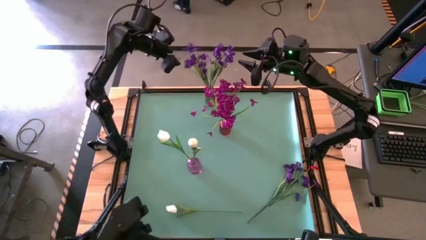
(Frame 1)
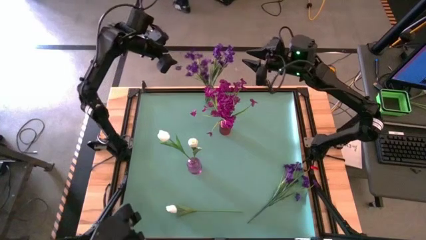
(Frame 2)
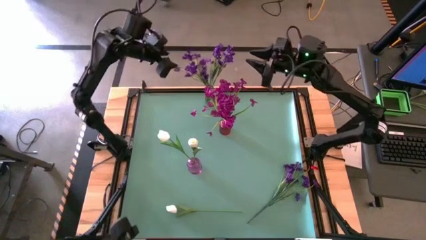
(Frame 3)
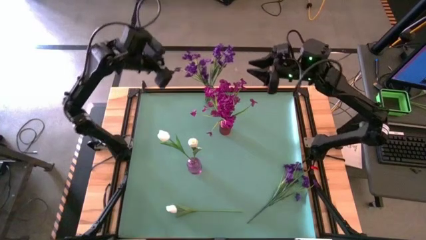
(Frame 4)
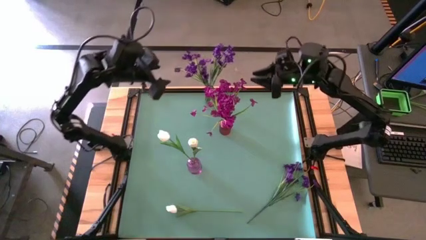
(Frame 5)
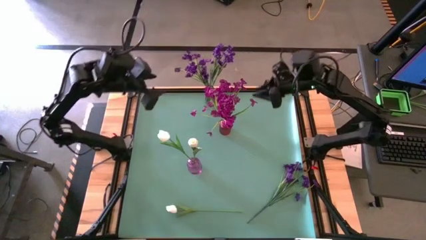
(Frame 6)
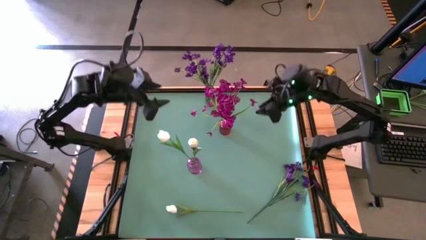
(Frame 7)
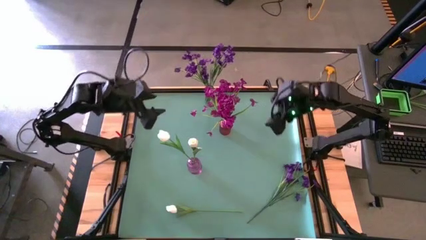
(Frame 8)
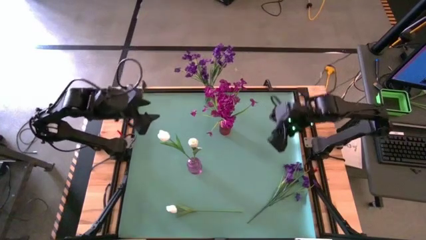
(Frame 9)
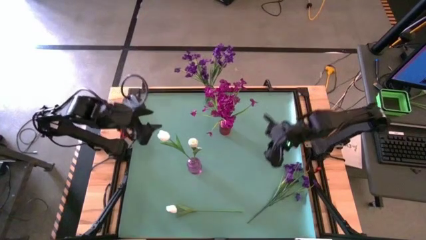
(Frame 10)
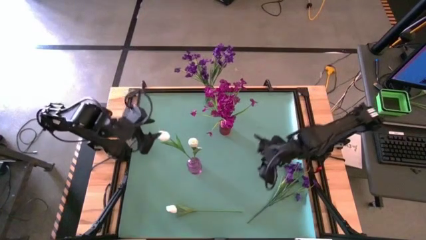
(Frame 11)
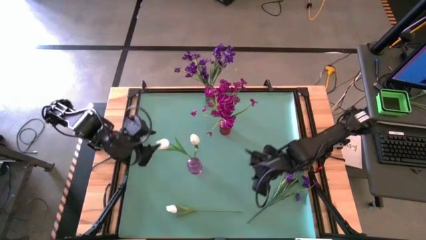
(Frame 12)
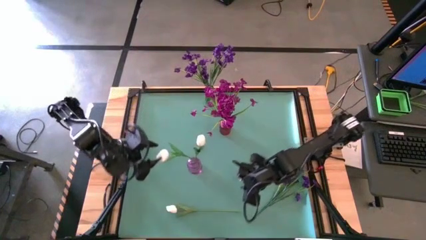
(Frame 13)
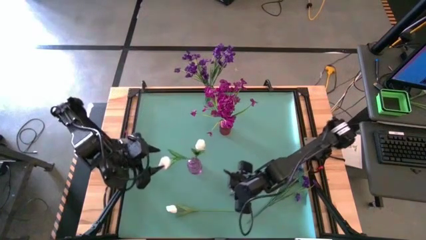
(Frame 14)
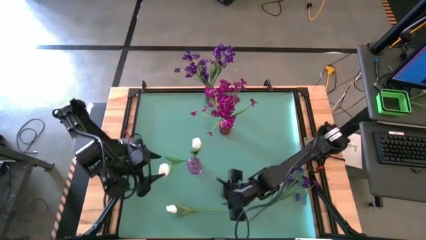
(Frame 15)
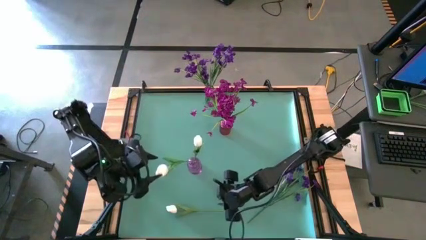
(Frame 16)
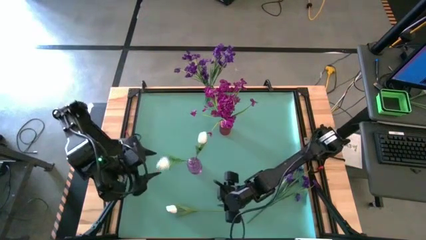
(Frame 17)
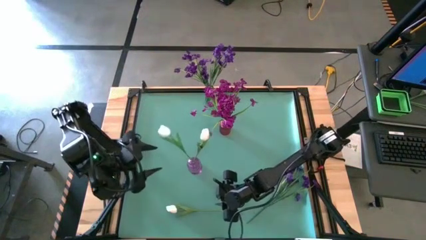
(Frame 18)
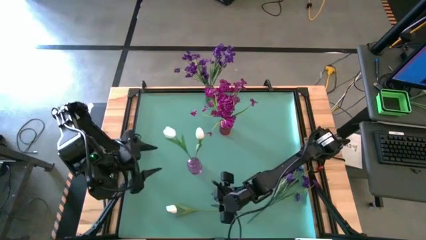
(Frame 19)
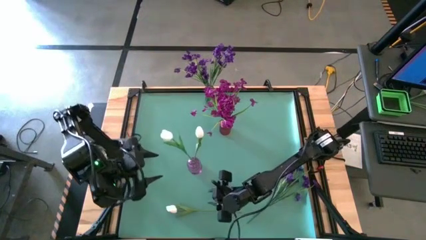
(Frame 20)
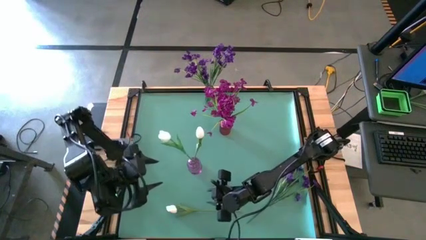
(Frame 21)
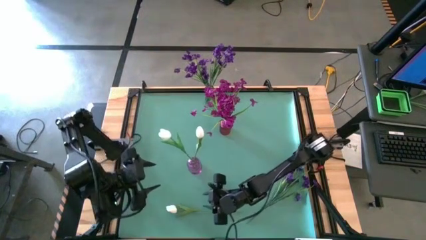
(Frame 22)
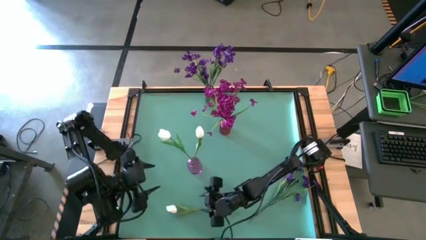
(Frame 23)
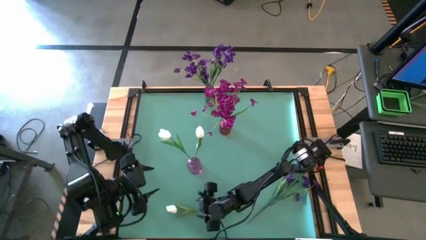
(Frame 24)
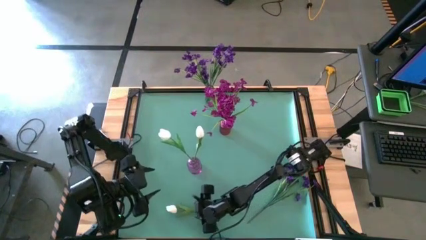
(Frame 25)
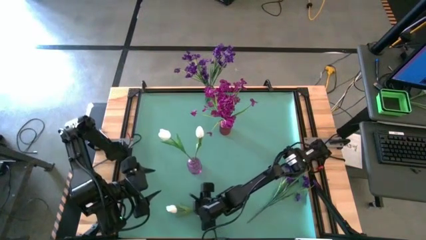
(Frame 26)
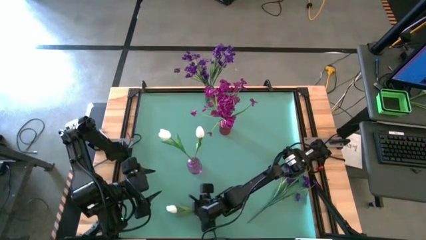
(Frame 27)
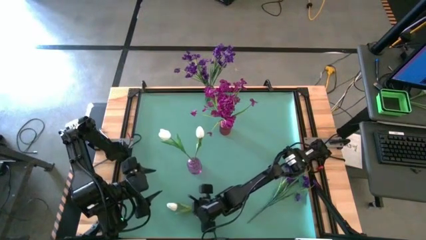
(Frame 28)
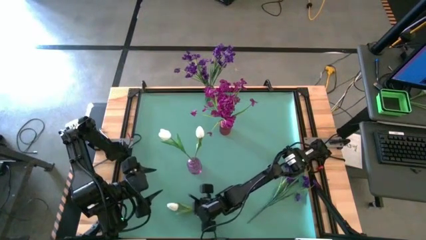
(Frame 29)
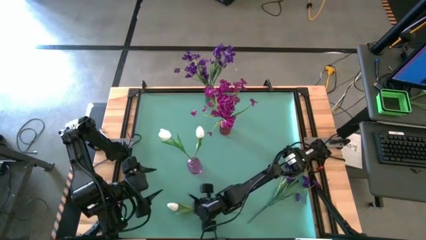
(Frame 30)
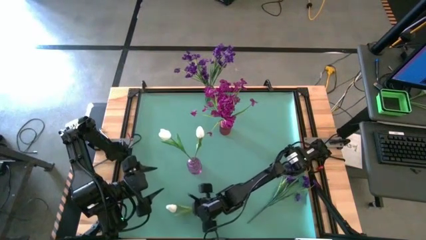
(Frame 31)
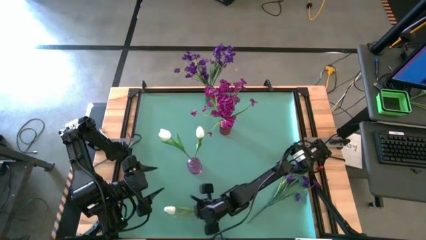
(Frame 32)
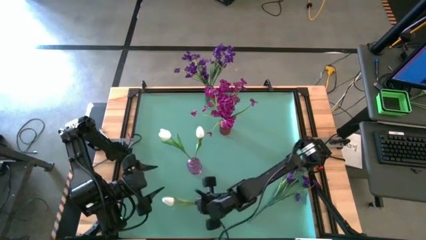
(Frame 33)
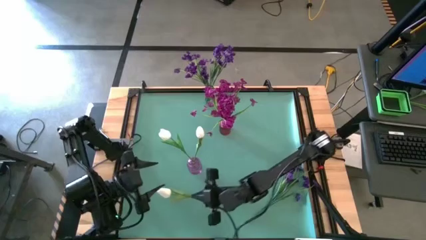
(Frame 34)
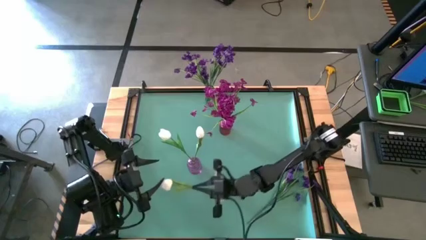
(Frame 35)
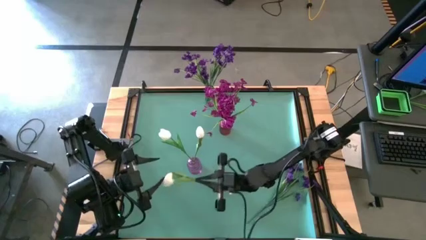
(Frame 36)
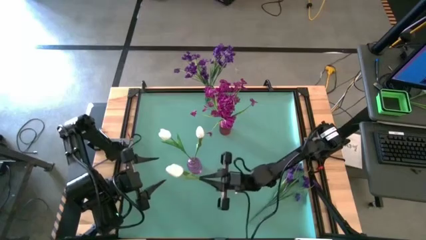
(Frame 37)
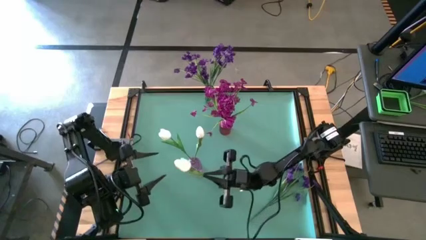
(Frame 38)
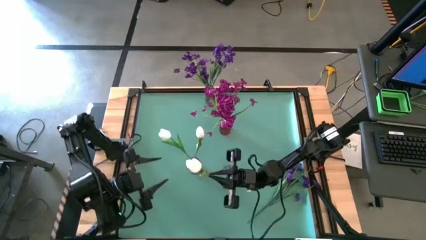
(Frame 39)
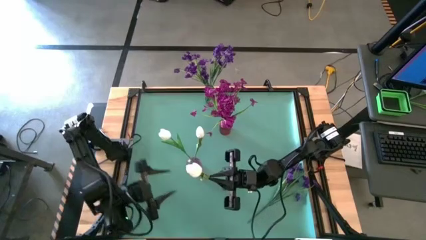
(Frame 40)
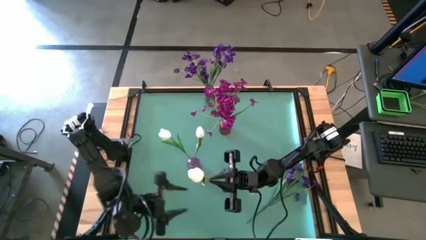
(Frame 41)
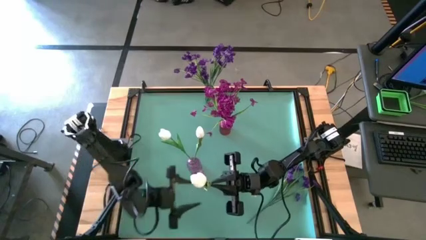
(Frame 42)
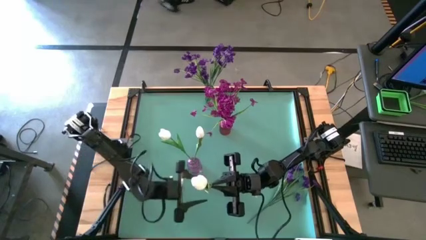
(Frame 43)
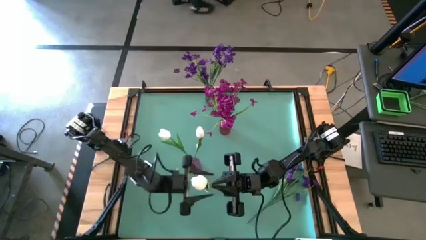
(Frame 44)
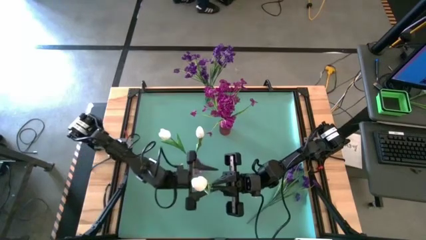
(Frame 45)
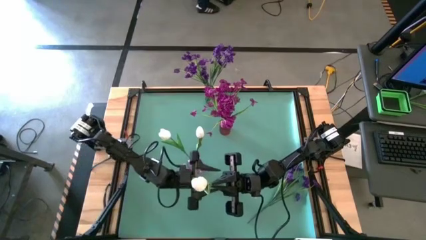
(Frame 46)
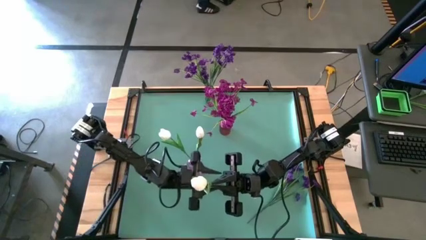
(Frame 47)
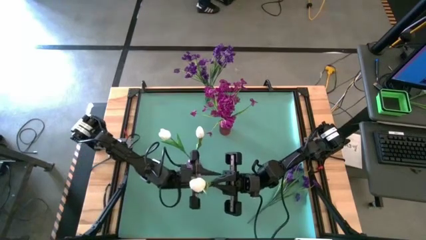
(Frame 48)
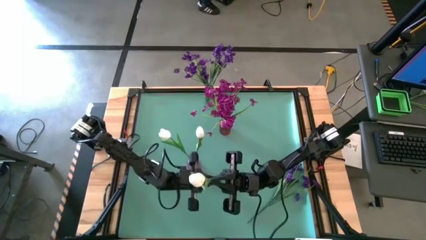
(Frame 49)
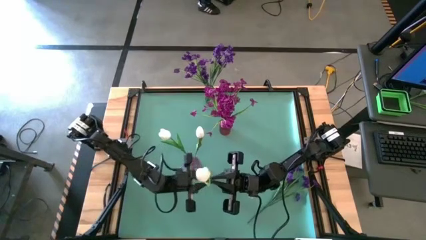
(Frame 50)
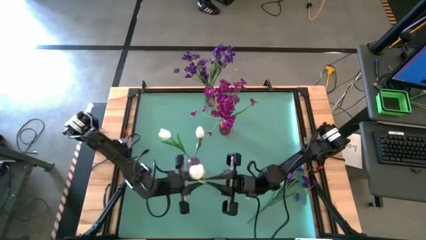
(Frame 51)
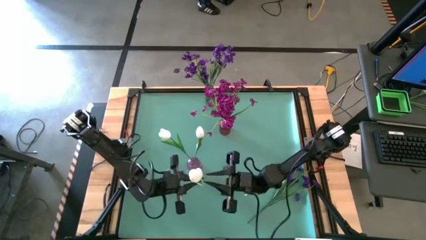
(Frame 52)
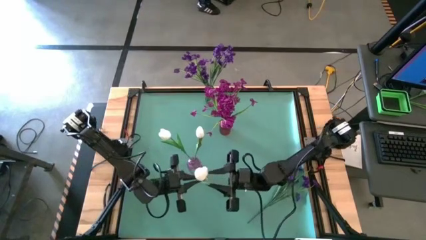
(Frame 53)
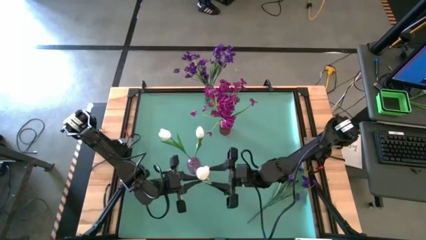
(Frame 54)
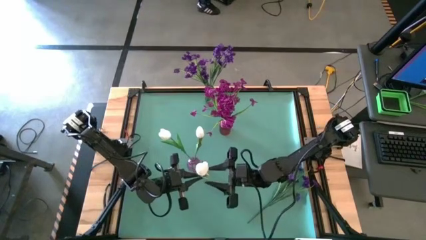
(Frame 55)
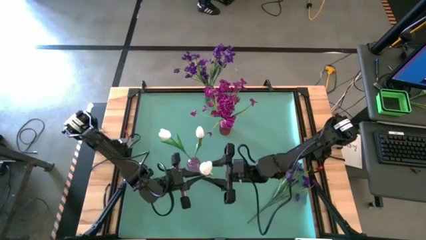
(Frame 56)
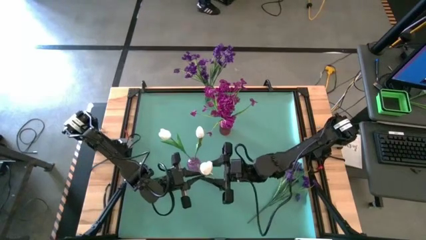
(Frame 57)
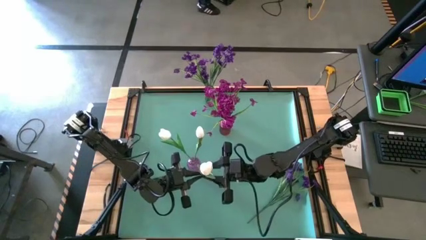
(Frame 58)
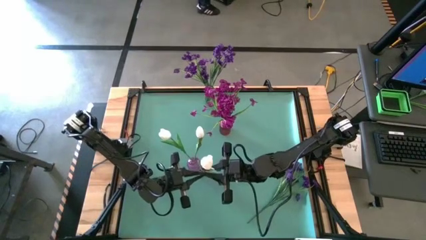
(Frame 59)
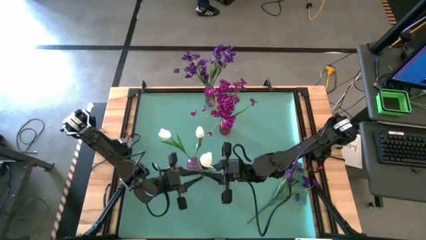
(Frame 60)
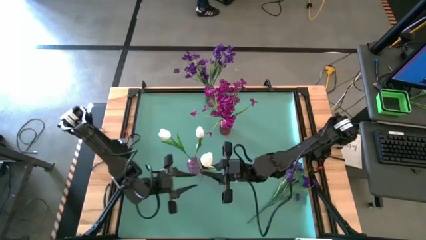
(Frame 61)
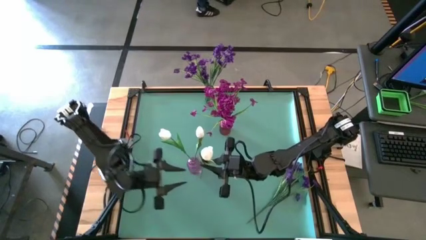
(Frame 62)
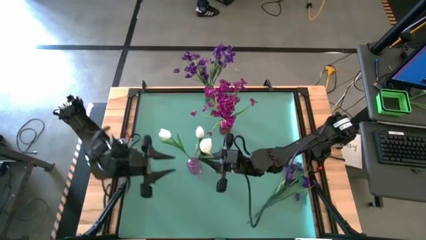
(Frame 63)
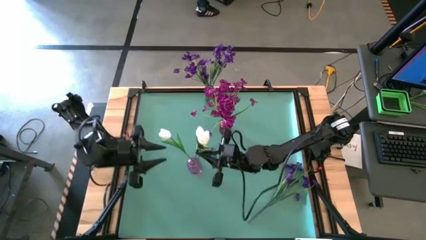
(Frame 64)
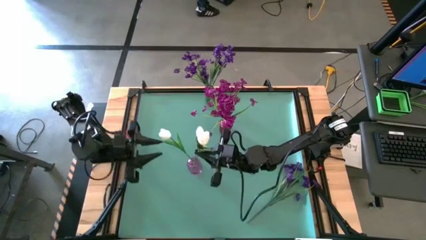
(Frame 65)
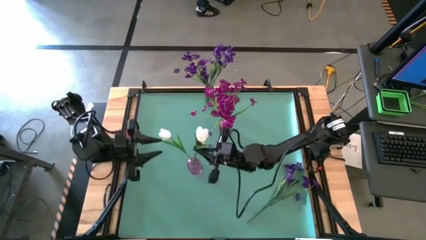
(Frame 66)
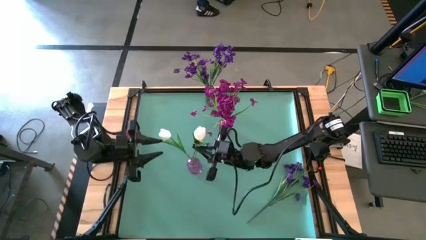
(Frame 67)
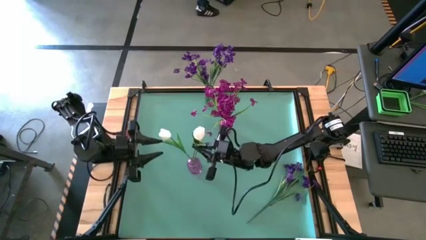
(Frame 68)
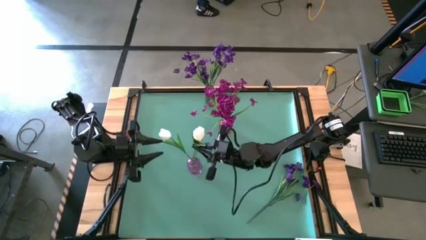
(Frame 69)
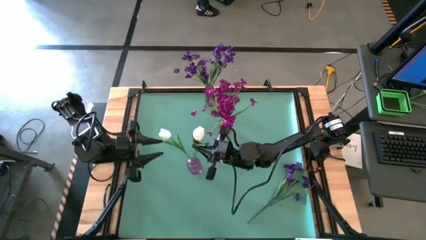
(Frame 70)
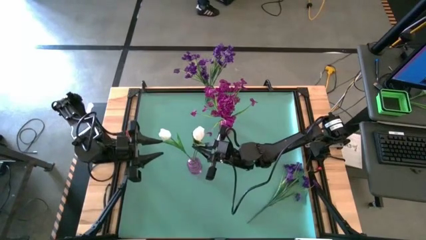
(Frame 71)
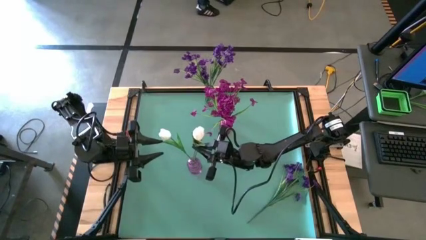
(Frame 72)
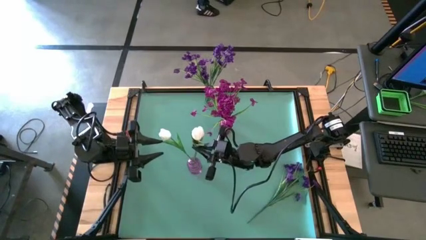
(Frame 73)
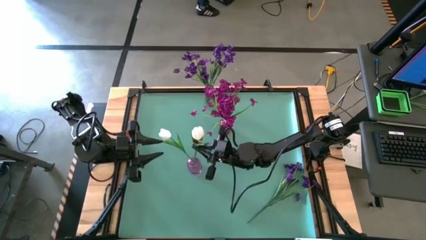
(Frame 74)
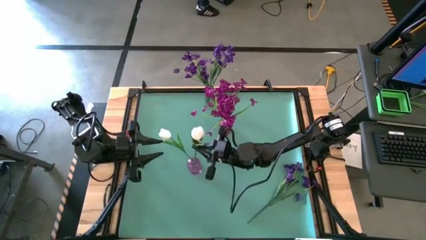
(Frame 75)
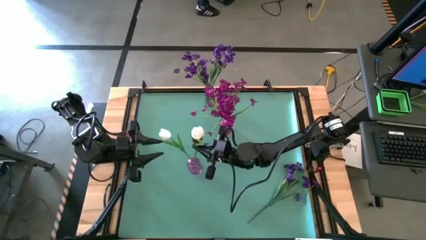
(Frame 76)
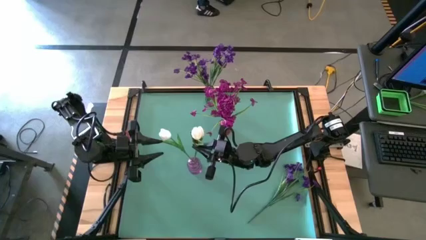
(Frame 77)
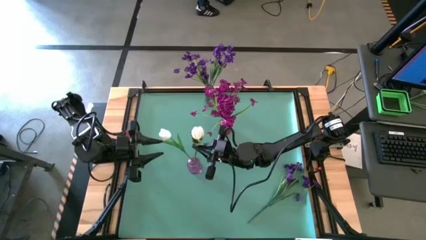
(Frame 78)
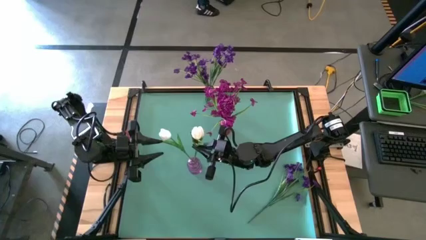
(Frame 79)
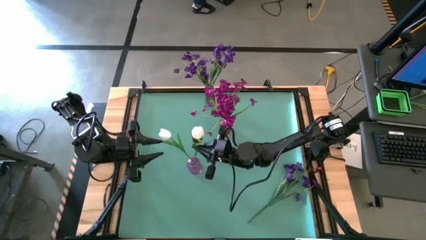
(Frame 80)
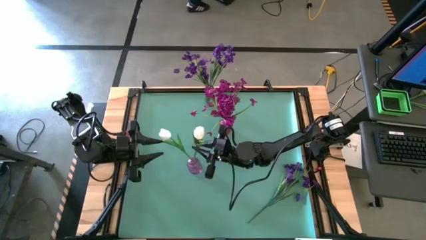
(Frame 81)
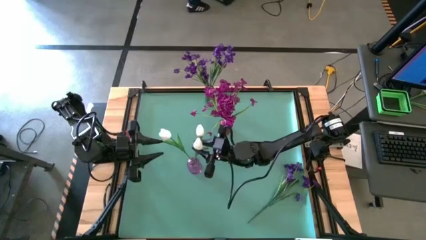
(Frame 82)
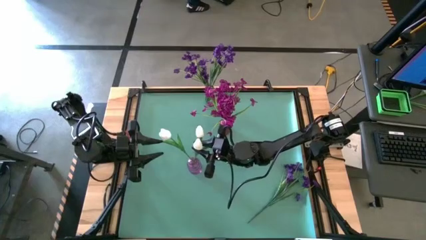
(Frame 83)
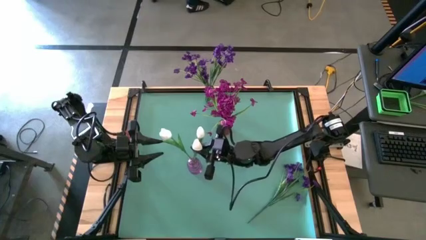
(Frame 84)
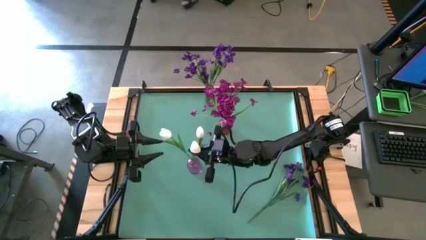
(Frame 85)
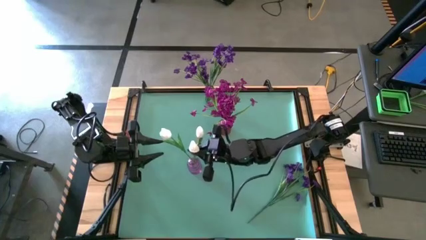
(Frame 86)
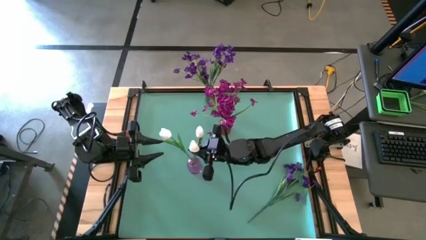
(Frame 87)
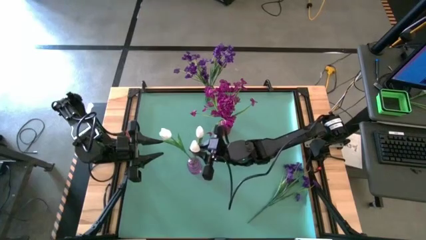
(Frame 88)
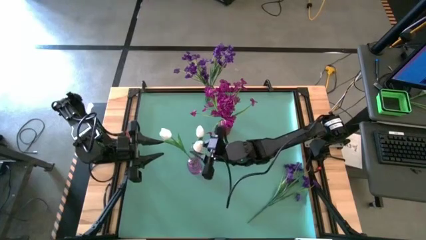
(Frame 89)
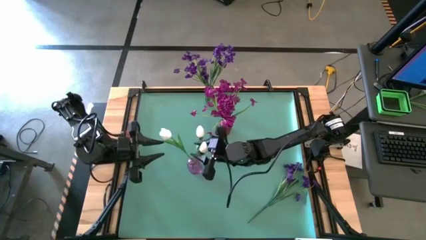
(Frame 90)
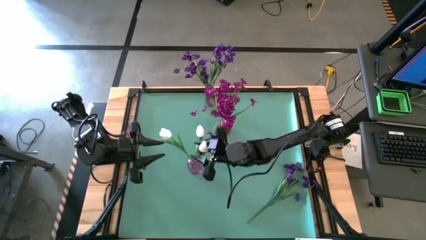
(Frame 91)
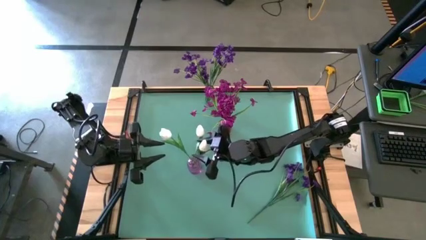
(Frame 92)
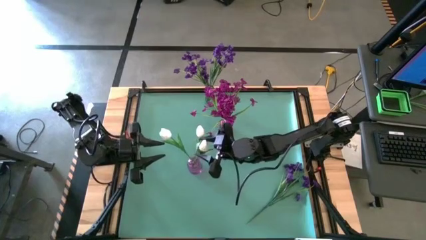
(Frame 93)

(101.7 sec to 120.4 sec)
Task: Sort flowers into vase by color
Put the white flower into the purple vase
